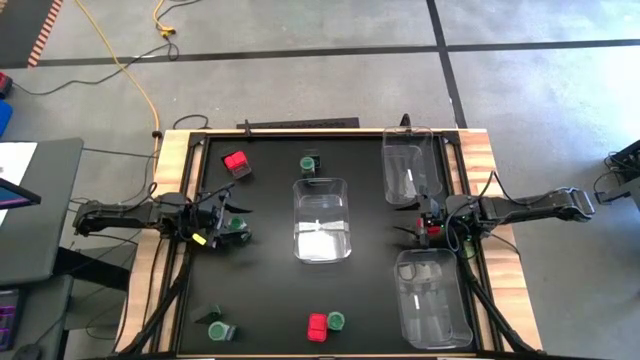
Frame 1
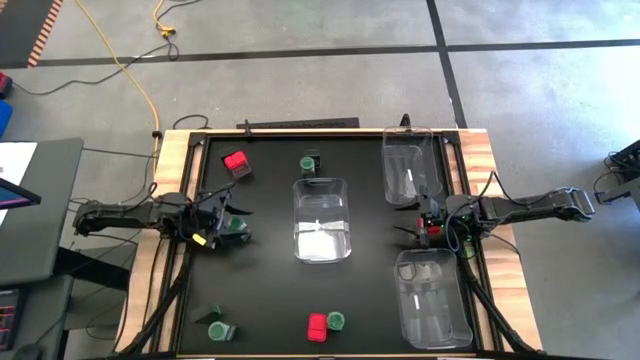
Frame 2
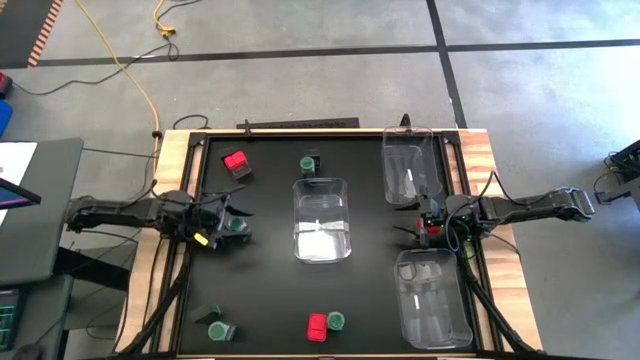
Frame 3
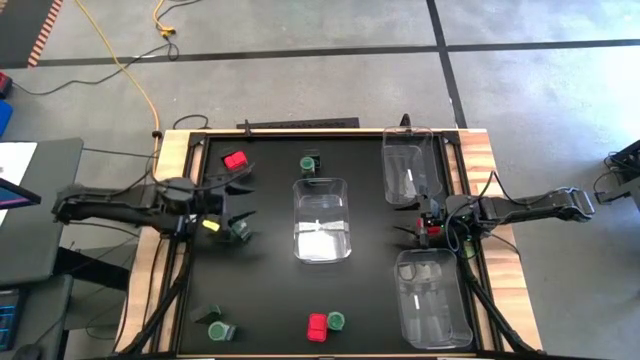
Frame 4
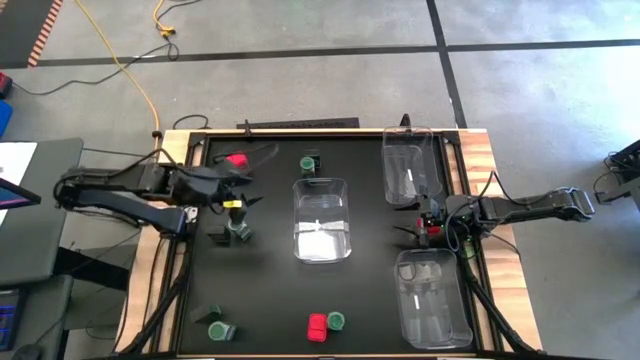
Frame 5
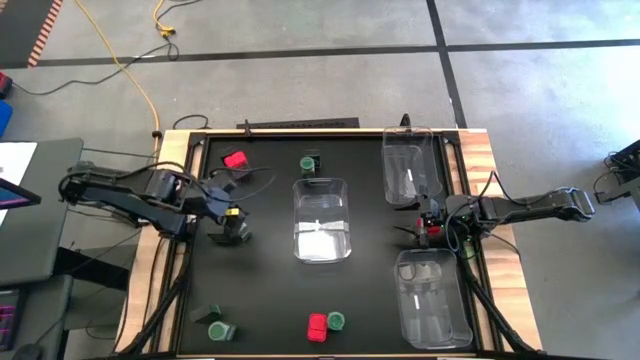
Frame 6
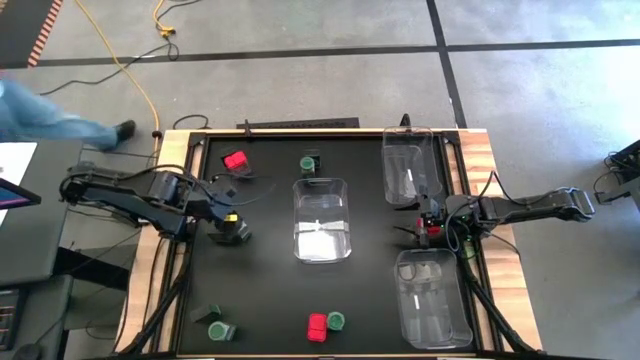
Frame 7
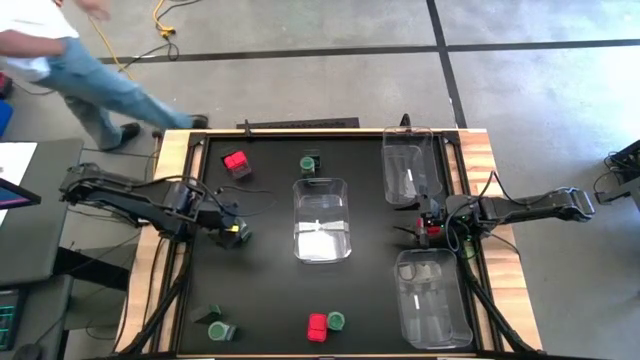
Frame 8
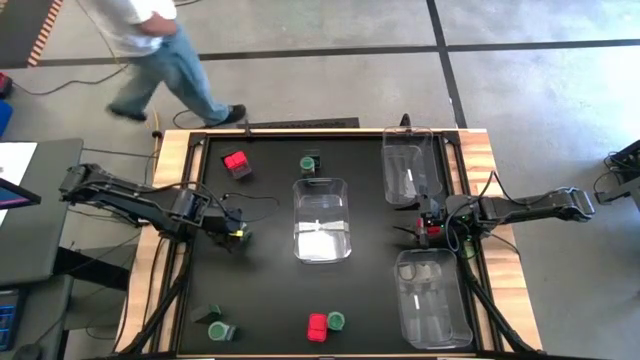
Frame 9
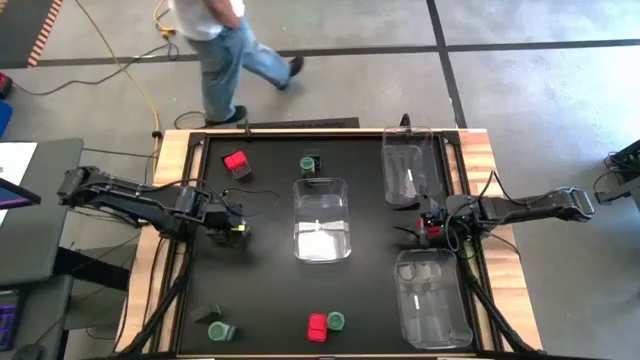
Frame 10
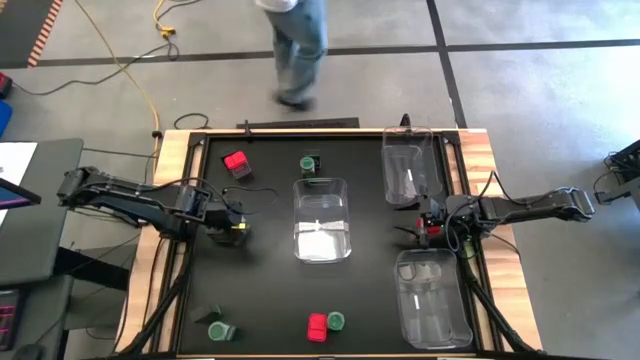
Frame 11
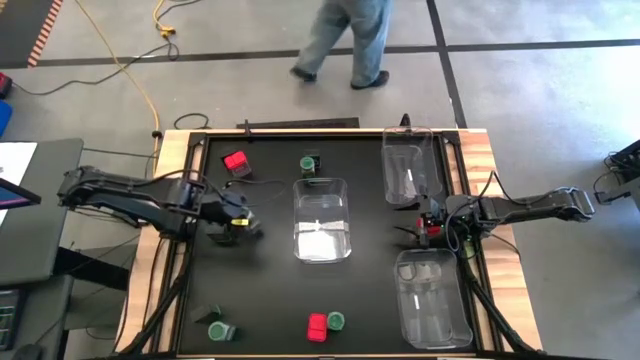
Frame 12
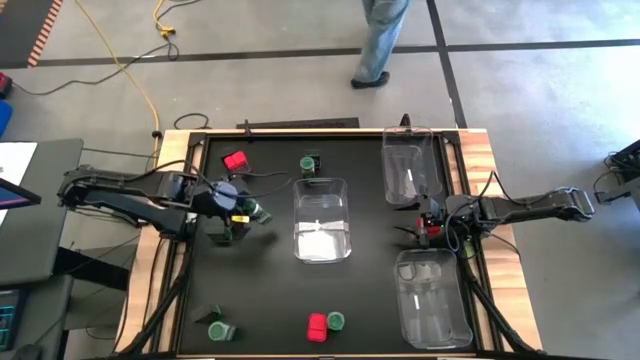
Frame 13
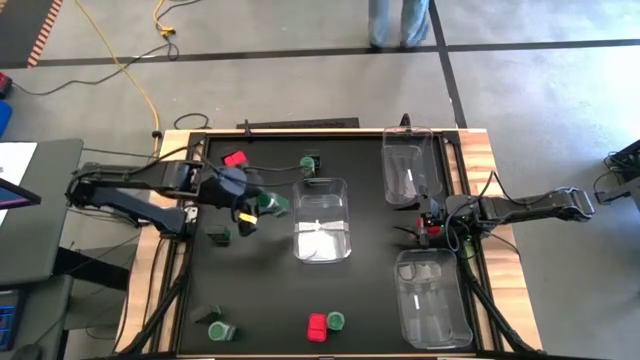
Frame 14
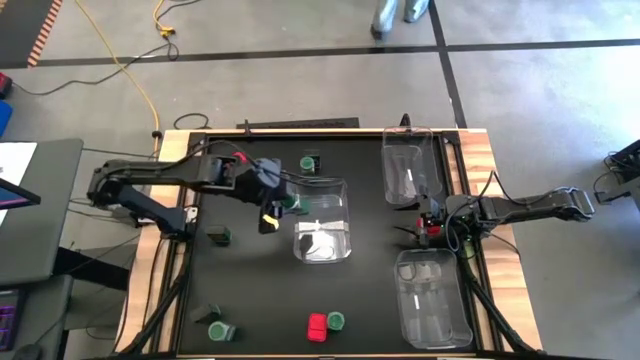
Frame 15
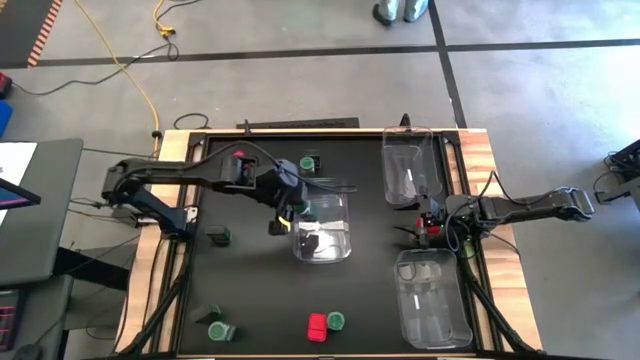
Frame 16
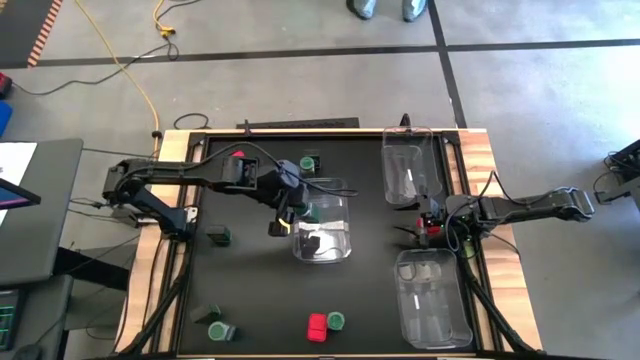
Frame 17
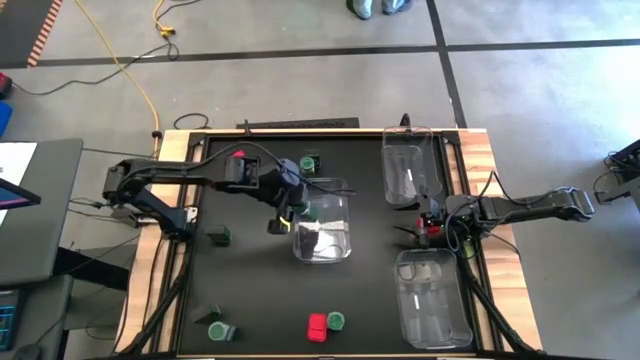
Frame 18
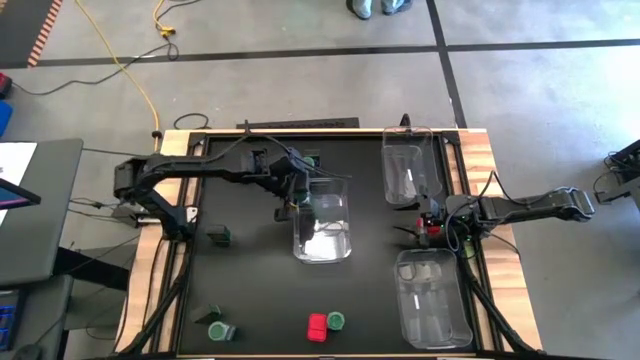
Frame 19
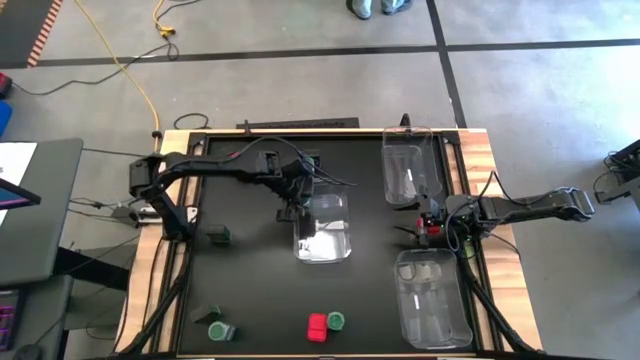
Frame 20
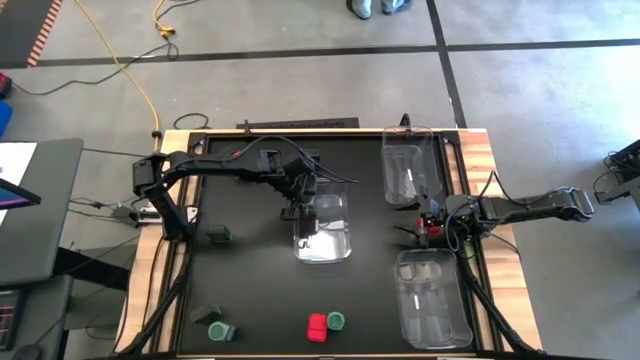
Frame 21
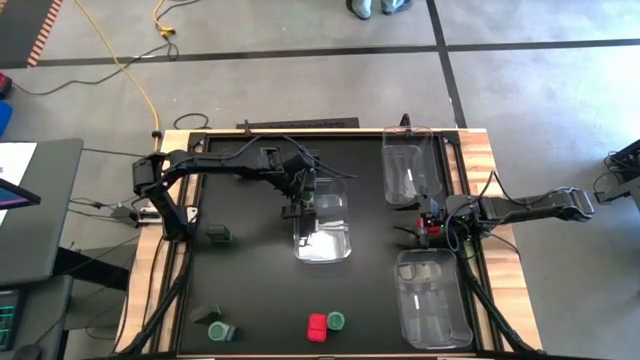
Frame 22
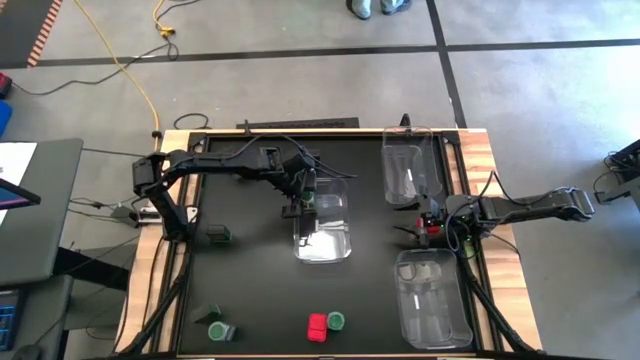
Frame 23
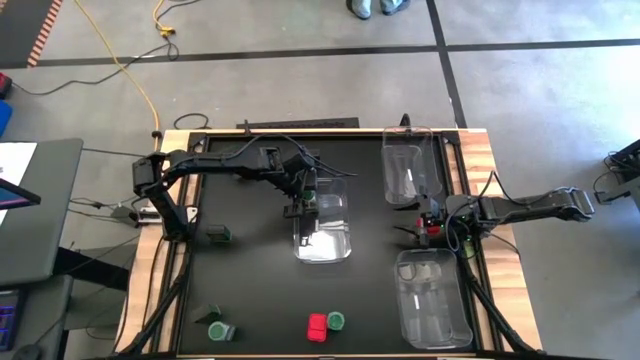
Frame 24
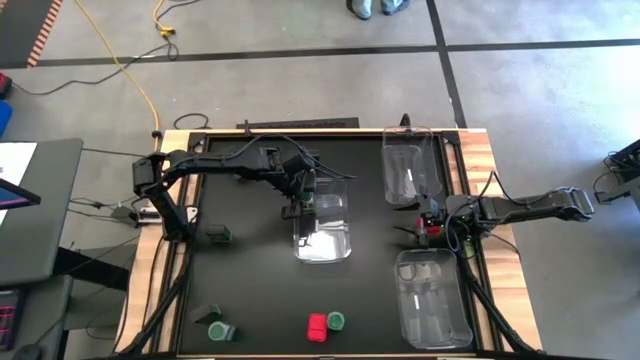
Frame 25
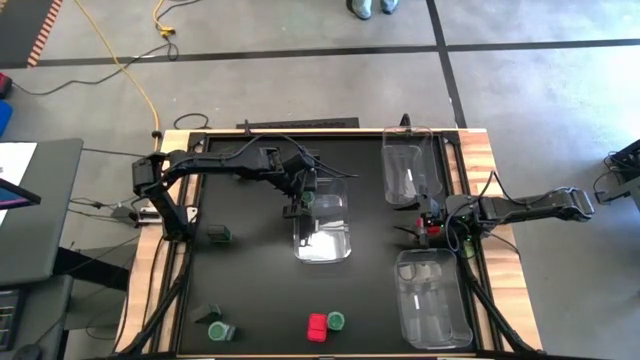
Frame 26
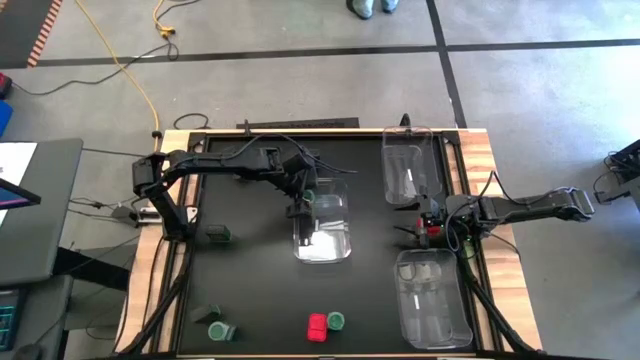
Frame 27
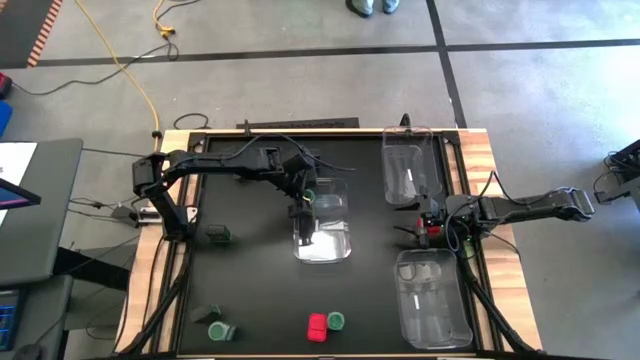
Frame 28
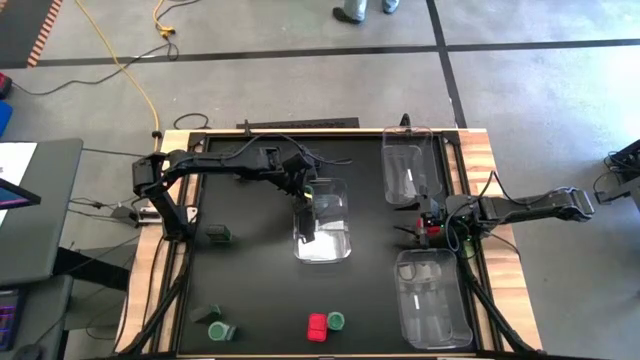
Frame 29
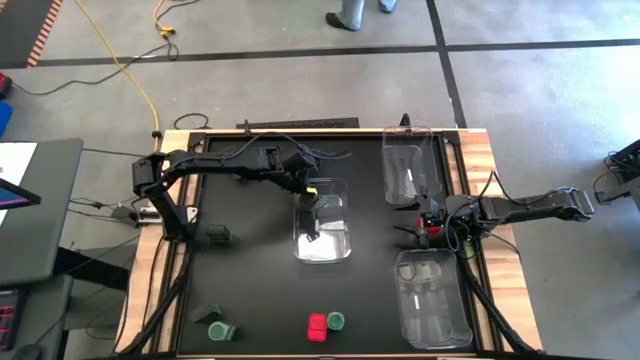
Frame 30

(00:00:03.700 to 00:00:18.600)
Task: Sort spices by type
Put the green seasoning bottle into the middle left transparent bin

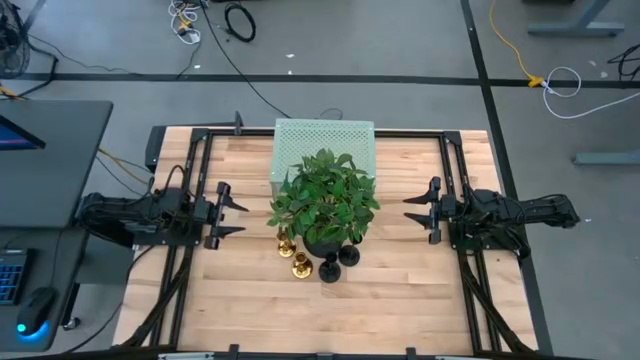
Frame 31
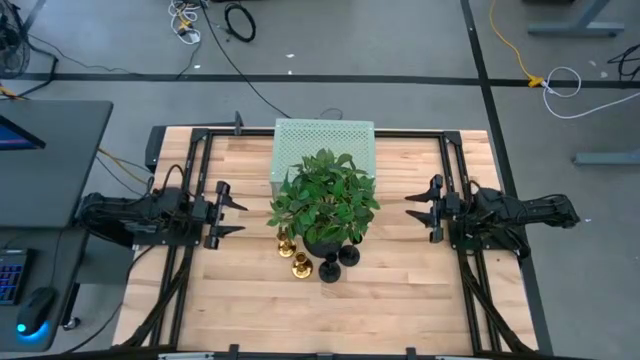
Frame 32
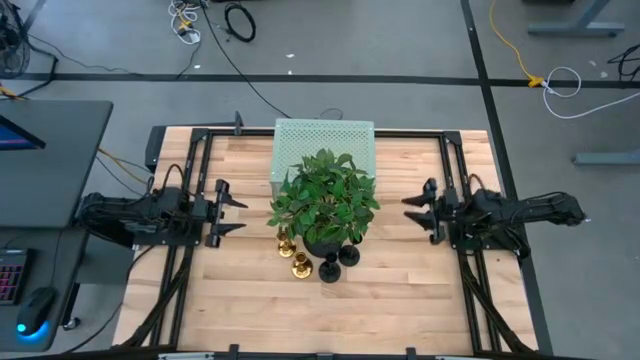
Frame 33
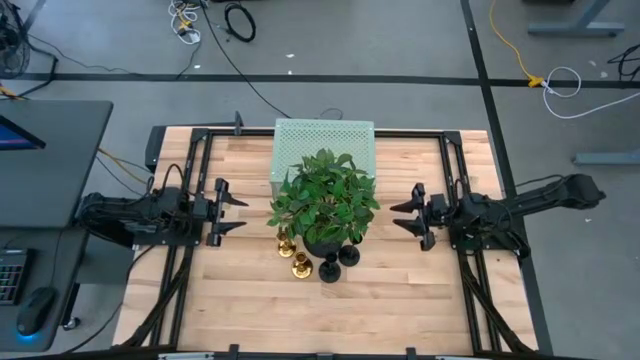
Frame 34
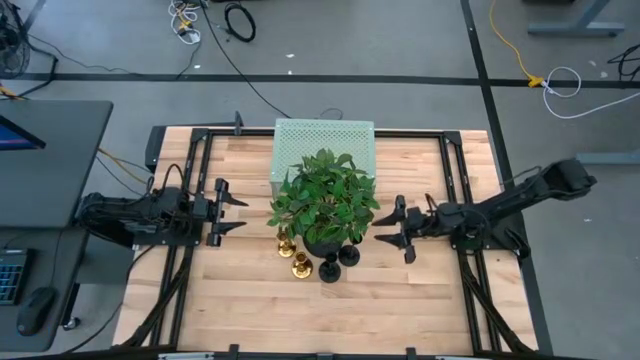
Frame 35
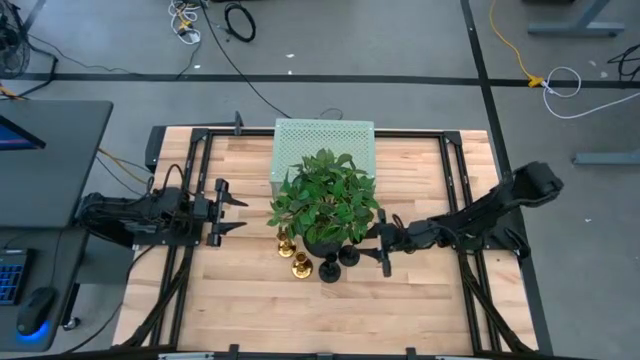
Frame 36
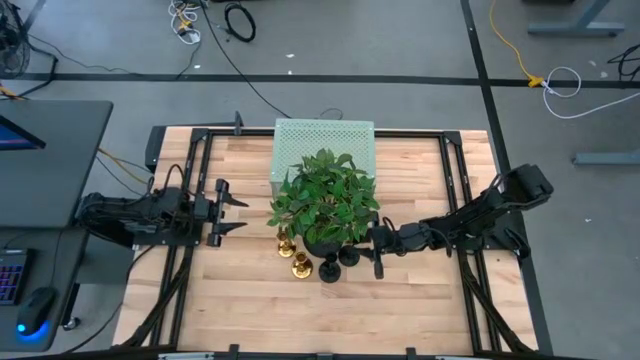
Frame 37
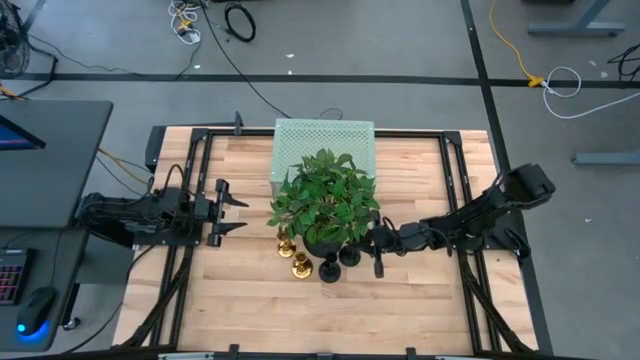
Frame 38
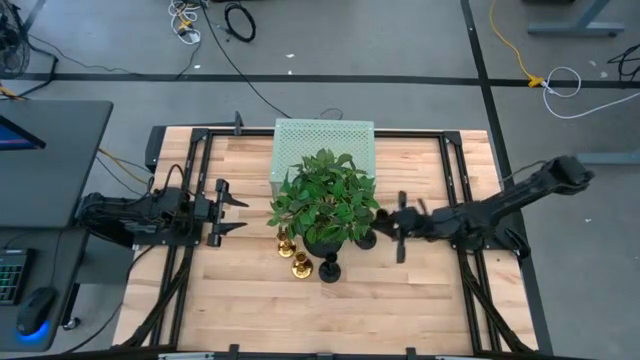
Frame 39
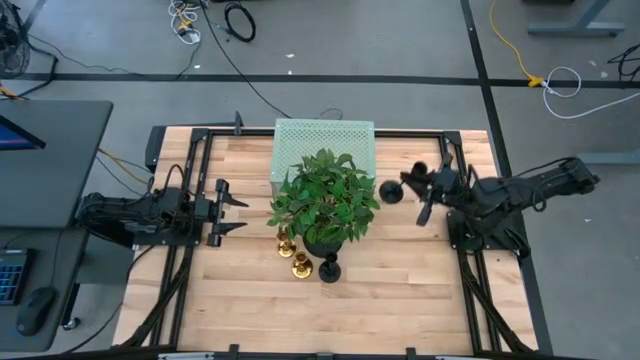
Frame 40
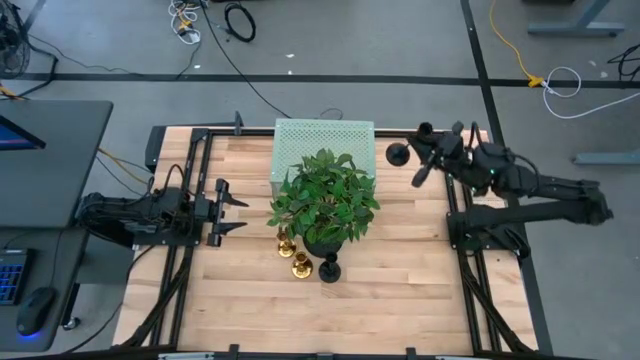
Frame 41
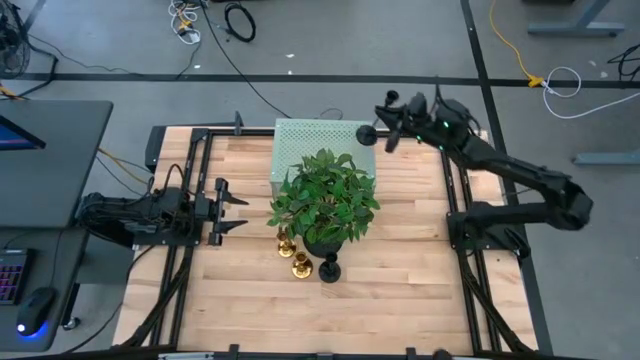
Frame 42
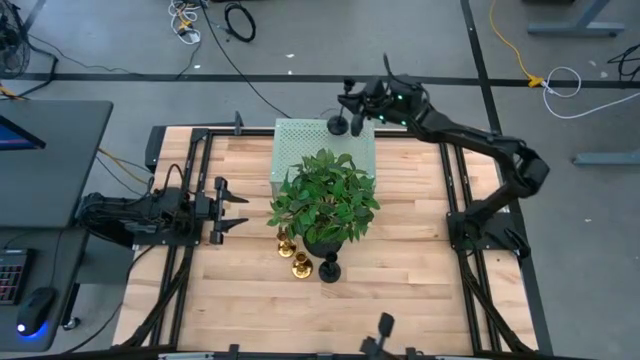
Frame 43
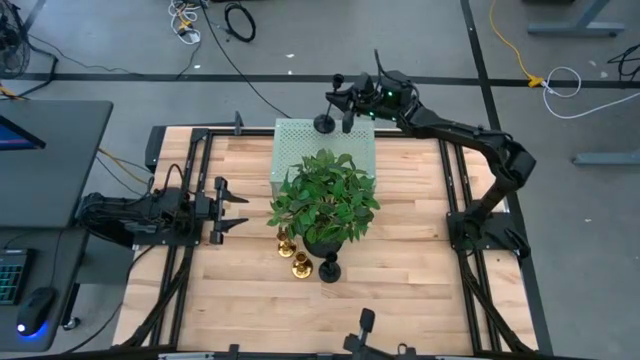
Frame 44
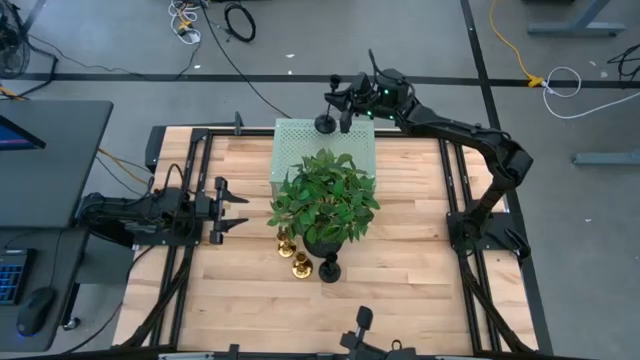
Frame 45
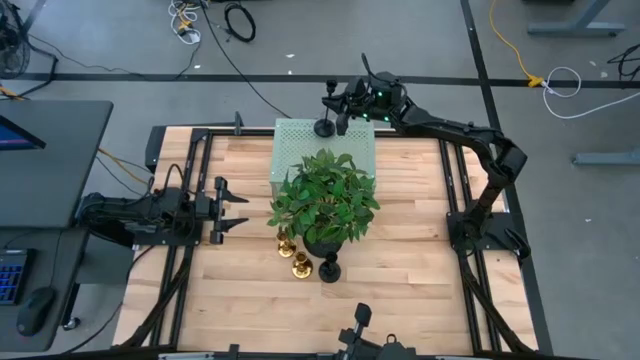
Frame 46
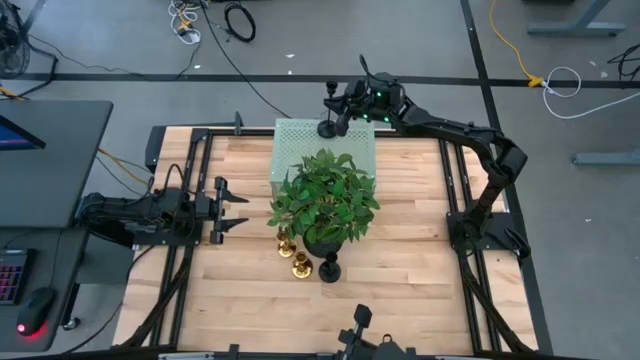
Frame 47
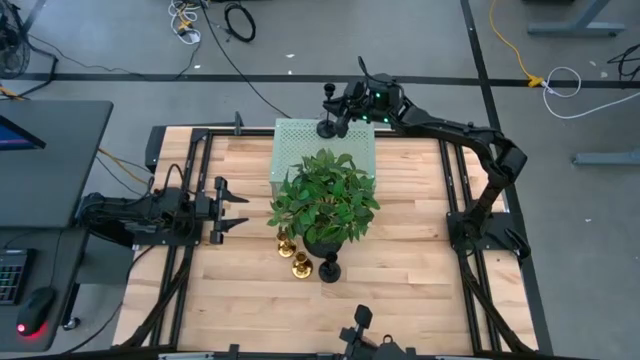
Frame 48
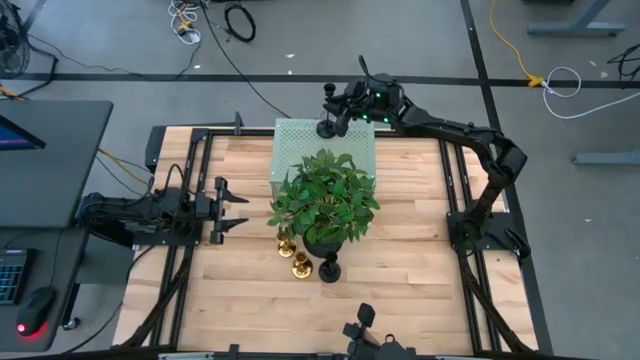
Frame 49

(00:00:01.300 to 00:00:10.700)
Task: Pick & Place candle stick holders
Put the right black candle holder on the shelf
